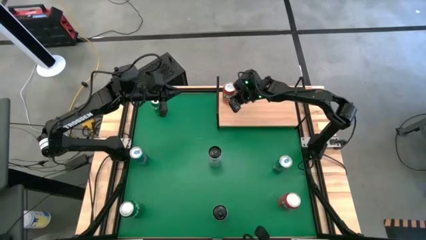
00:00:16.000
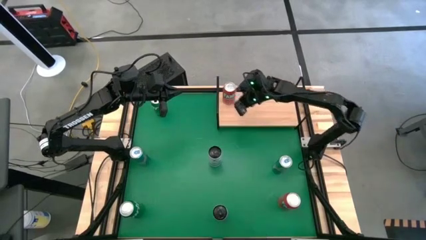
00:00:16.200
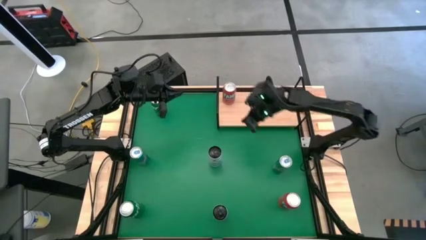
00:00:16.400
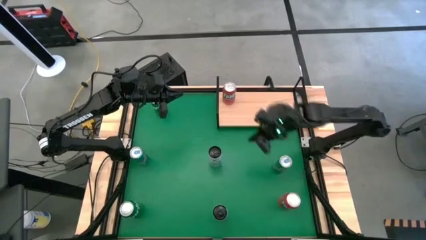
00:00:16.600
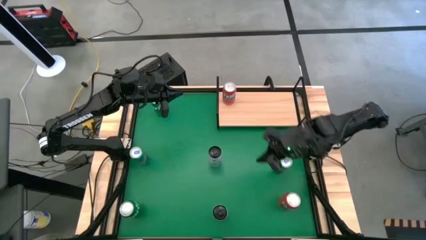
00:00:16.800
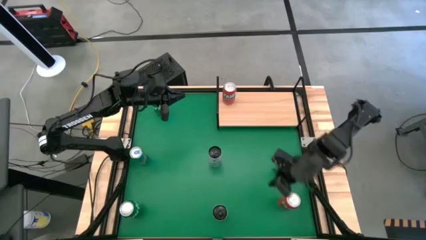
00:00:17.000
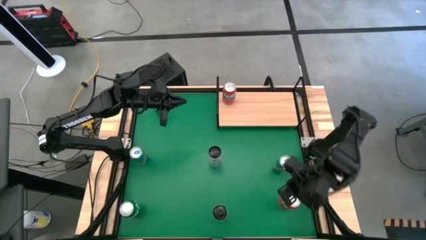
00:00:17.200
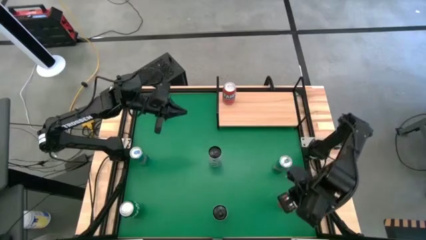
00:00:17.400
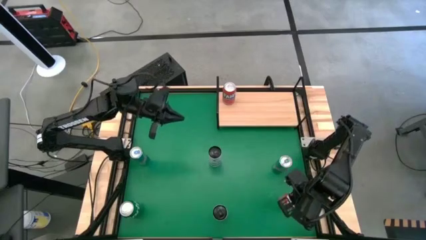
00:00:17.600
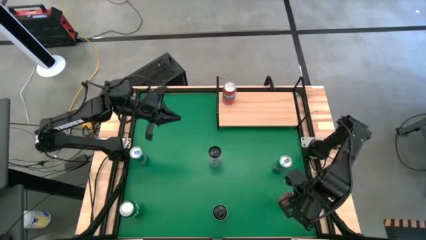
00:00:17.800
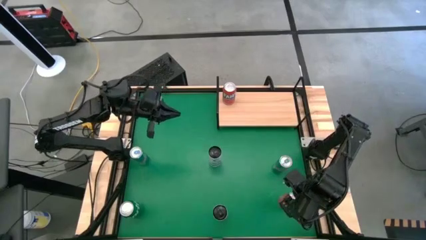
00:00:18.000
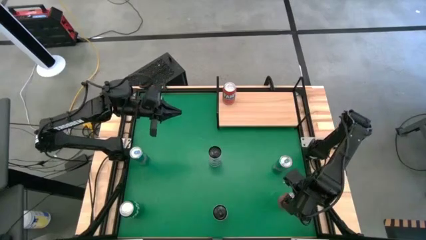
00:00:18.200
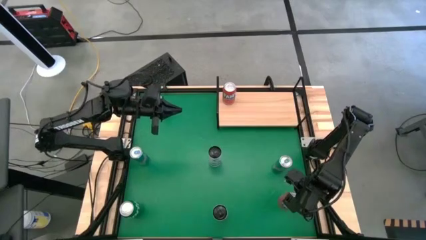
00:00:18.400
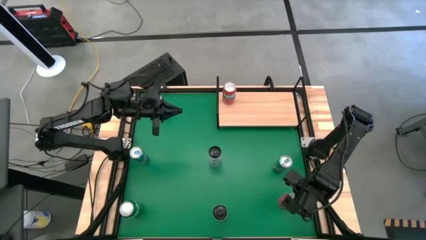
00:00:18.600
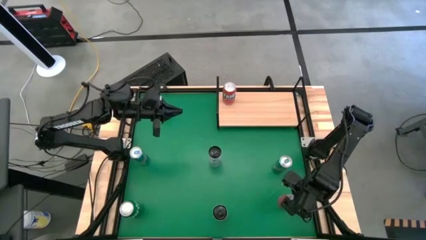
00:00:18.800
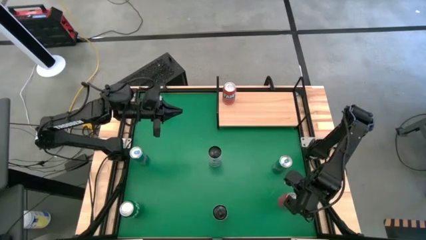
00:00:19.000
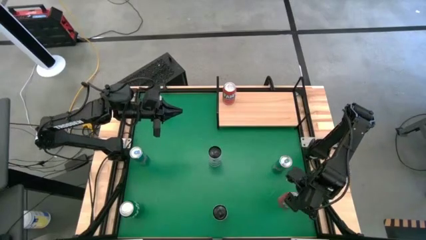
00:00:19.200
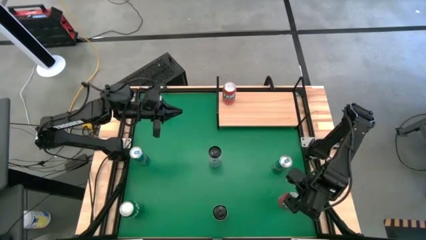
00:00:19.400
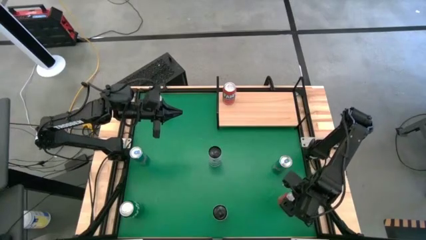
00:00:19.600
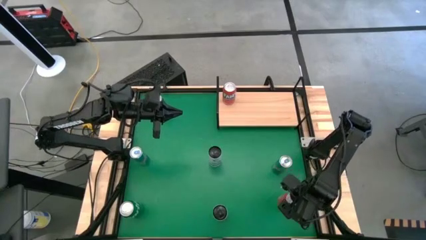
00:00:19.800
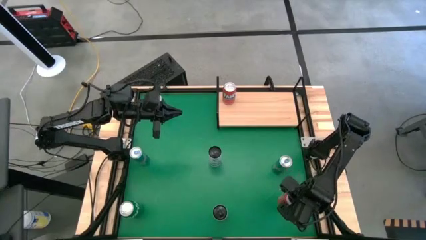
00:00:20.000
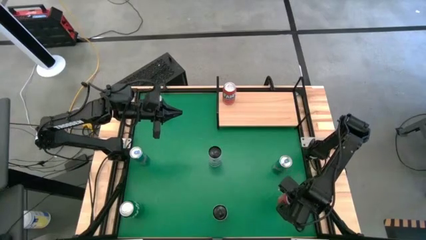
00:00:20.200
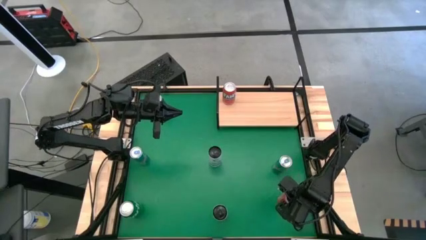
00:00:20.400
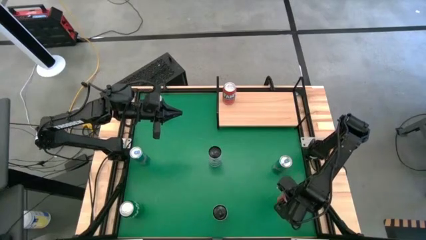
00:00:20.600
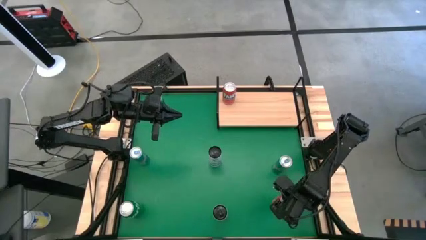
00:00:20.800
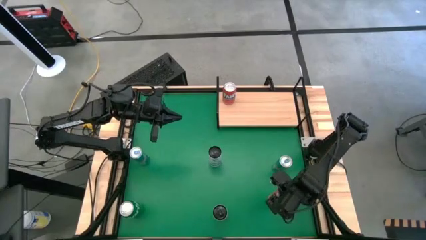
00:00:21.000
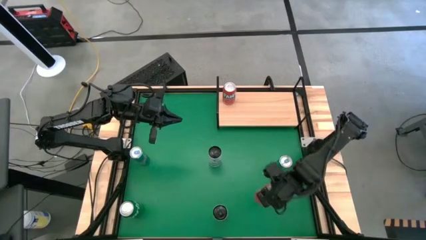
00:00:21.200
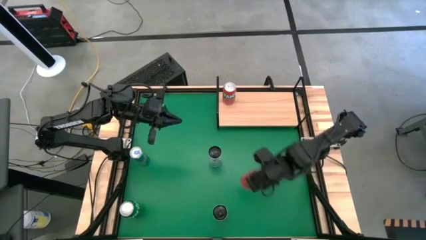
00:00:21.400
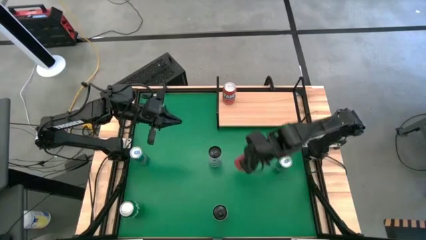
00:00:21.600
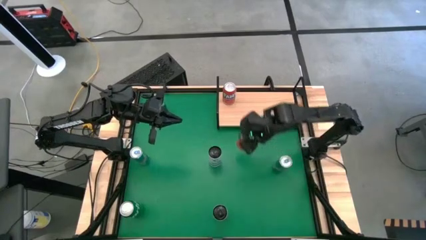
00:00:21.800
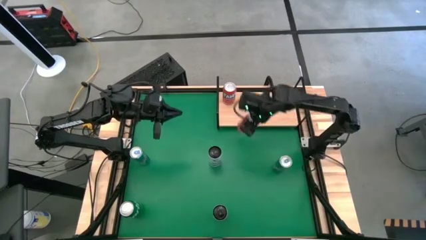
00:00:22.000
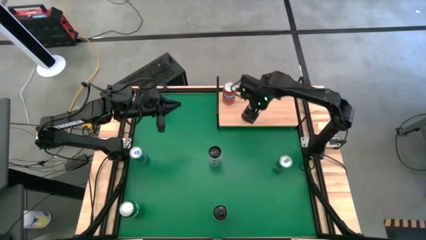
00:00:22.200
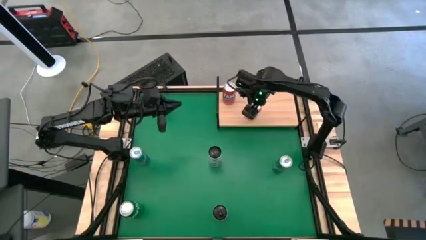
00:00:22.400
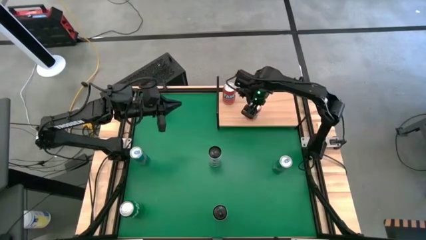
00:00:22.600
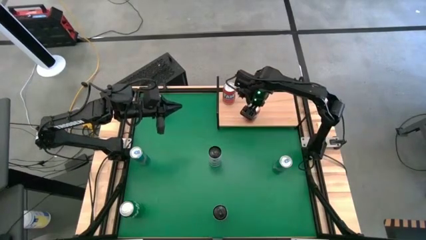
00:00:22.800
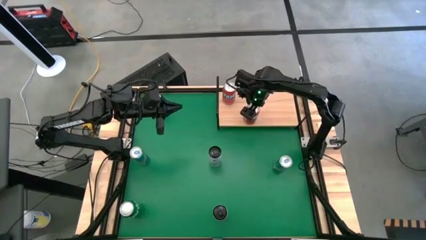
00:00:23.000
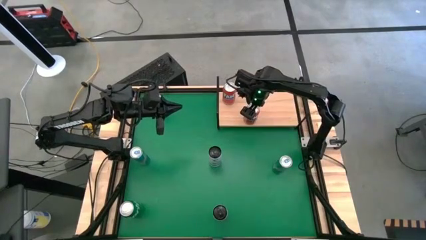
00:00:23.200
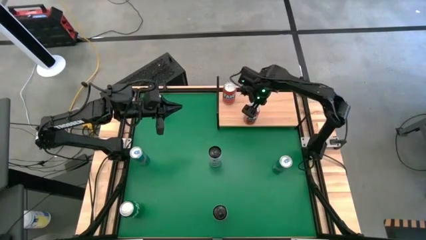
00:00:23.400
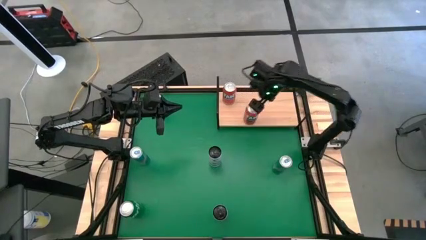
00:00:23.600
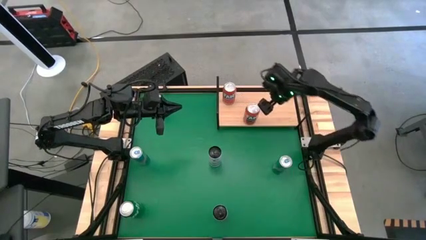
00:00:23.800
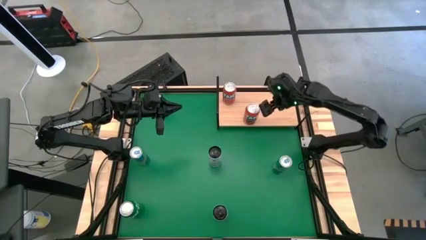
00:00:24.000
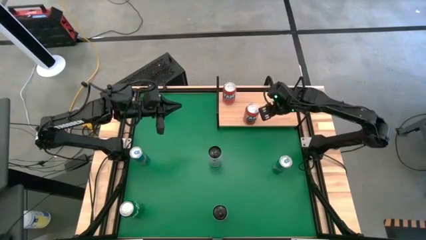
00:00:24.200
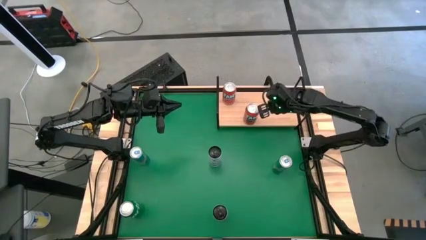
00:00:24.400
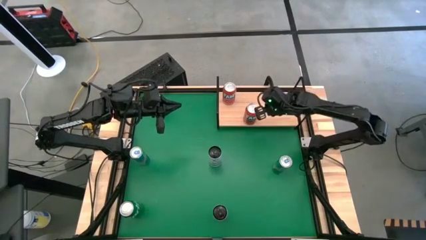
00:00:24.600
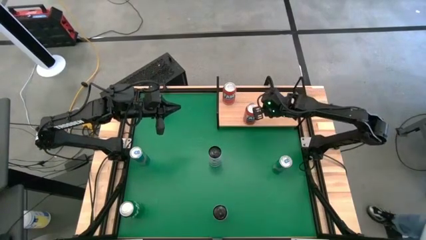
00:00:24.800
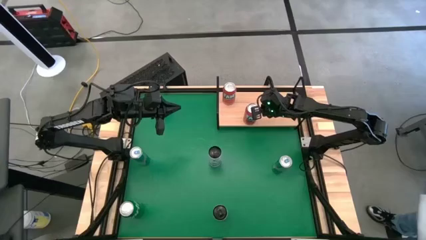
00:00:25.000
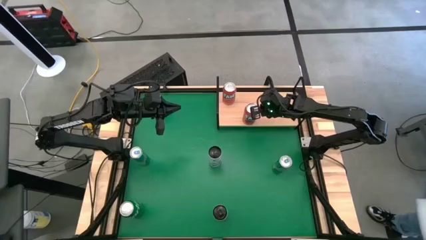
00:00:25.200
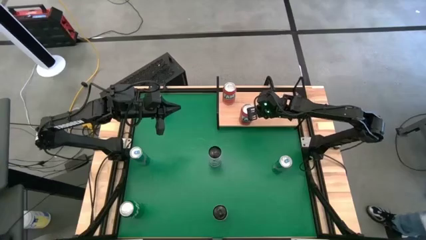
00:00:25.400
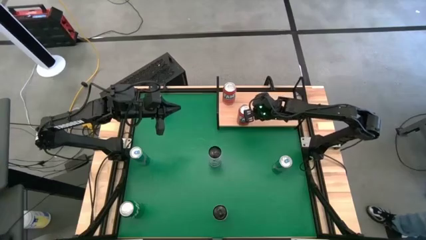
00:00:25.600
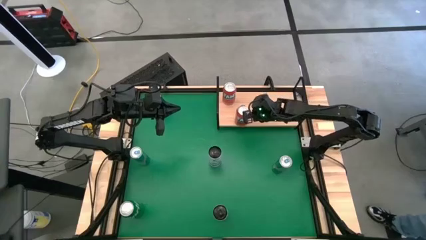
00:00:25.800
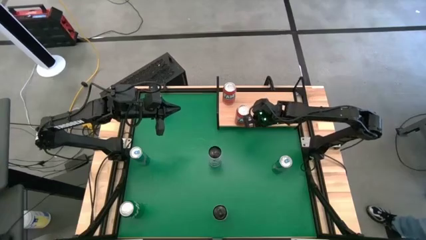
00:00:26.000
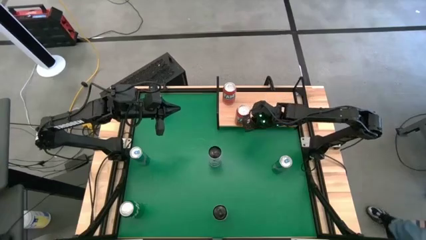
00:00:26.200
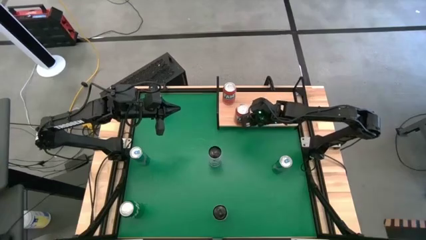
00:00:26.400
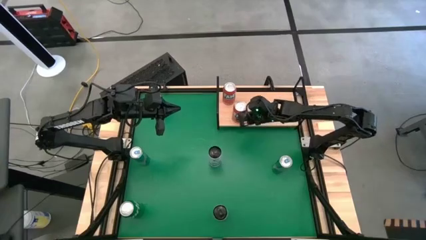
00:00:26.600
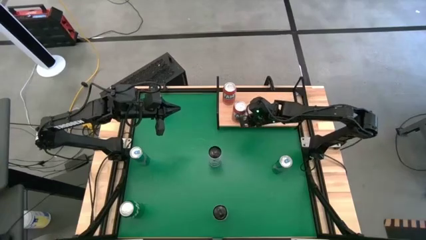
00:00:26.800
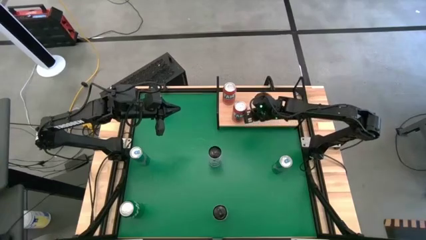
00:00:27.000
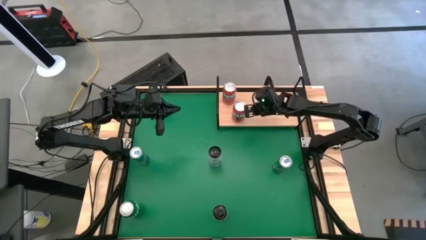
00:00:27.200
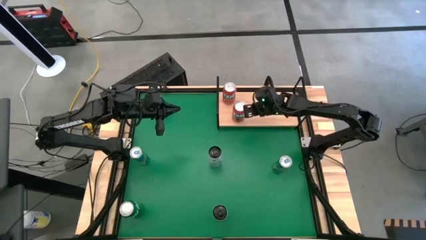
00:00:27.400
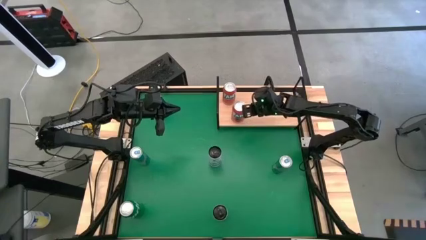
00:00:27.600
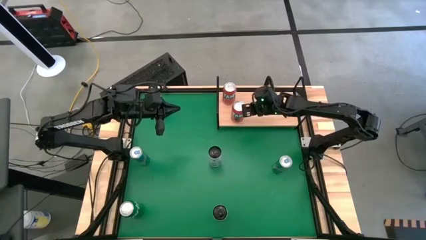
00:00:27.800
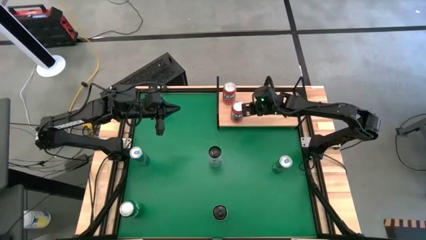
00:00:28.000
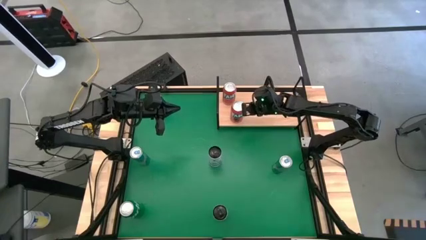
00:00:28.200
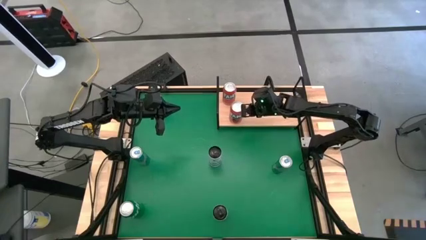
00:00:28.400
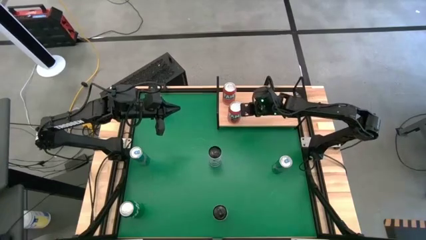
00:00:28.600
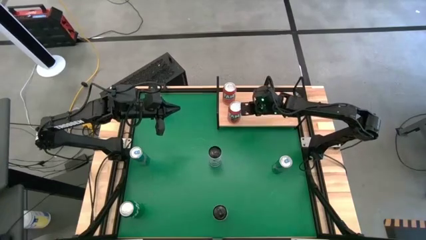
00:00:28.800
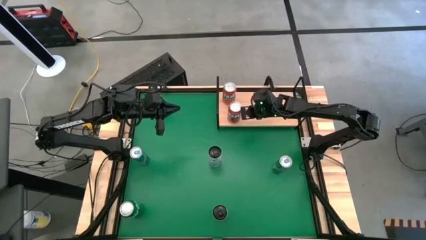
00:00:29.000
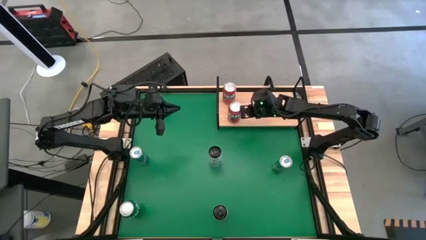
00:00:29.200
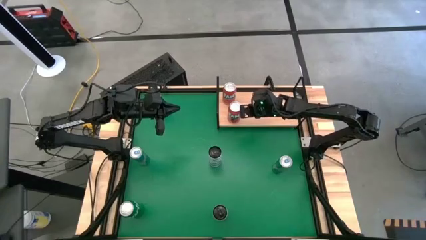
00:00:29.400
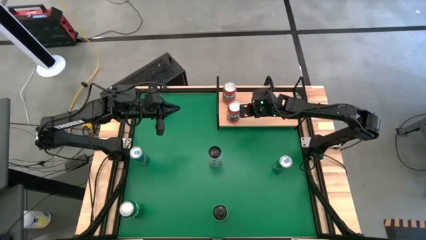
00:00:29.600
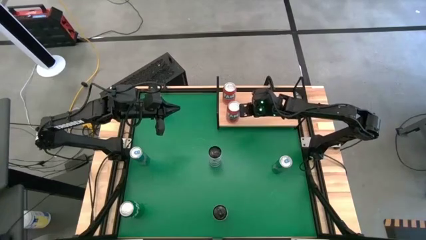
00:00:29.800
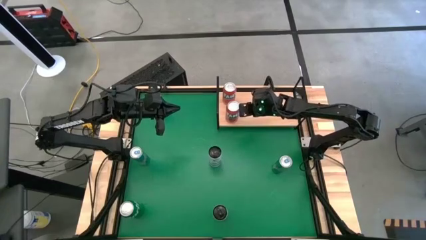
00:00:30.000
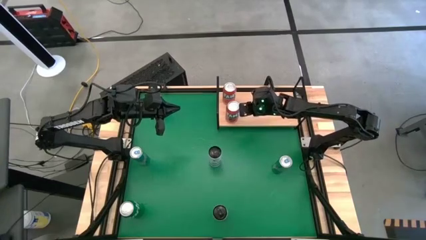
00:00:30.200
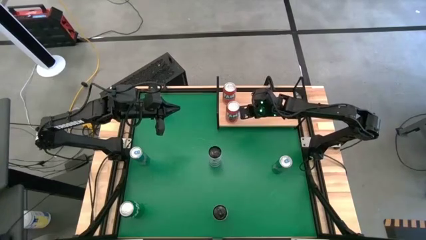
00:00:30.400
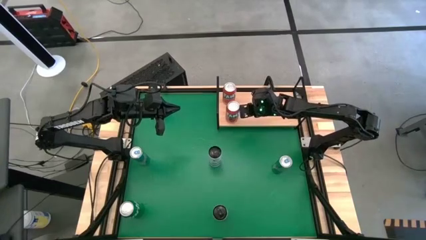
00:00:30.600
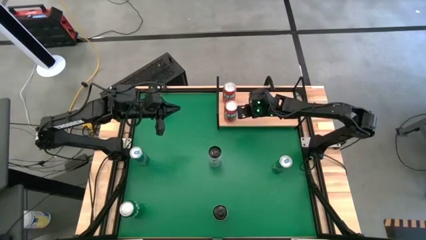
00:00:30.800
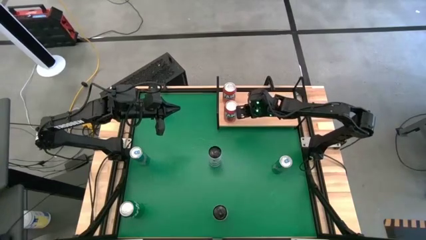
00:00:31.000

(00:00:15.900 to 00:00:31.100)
Task: Place canned beverage on shelf
Put the orange soda can on the shelf aligned with the other orange soda can
